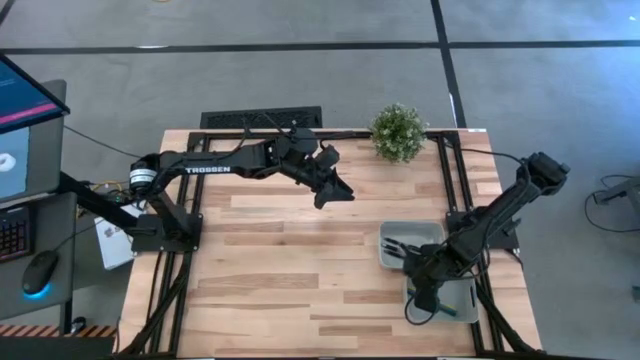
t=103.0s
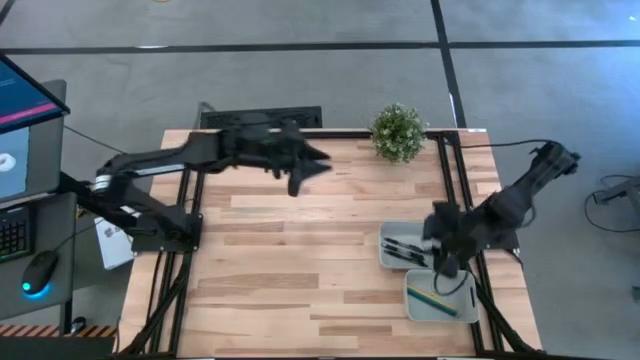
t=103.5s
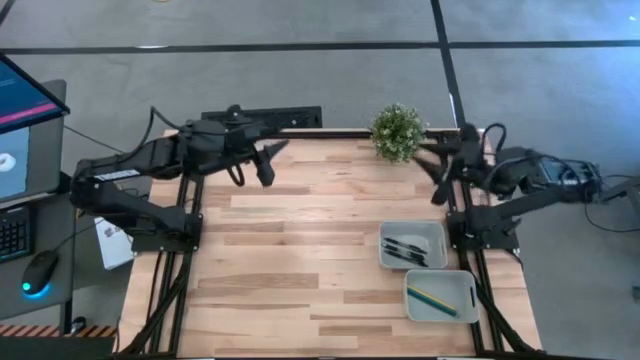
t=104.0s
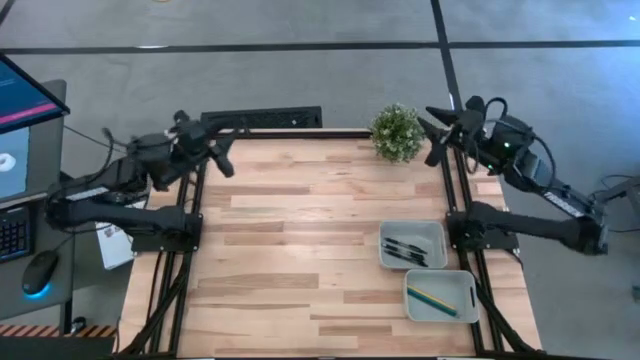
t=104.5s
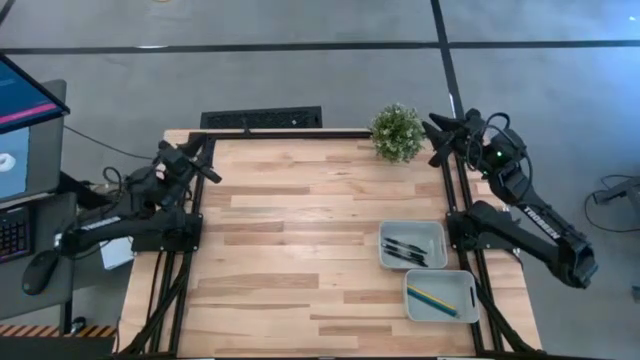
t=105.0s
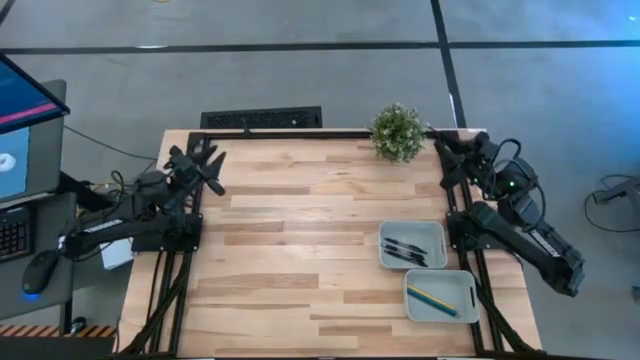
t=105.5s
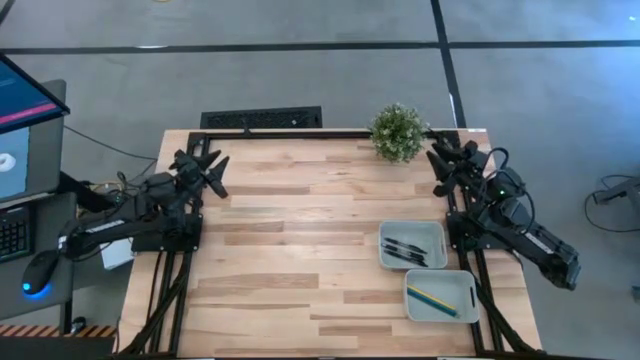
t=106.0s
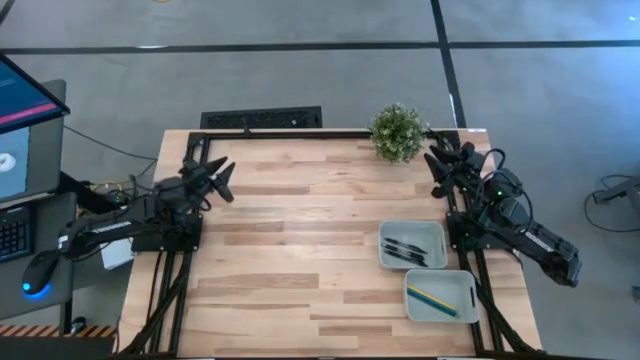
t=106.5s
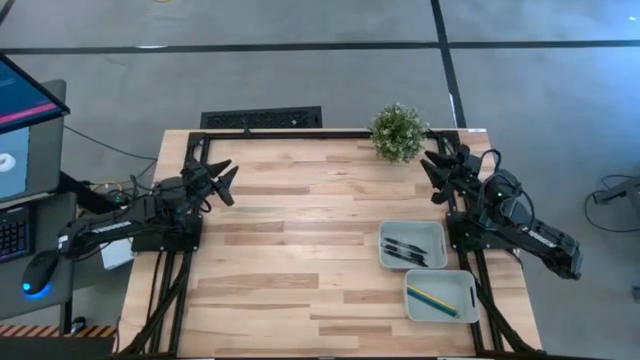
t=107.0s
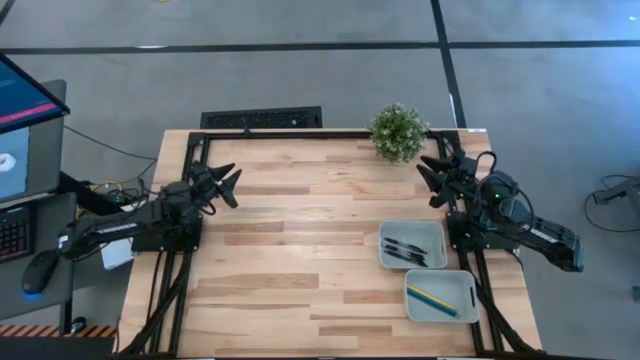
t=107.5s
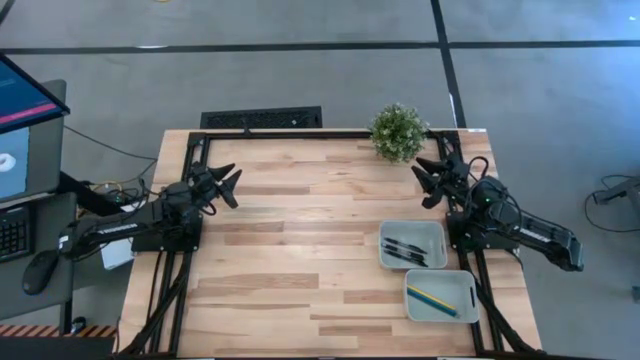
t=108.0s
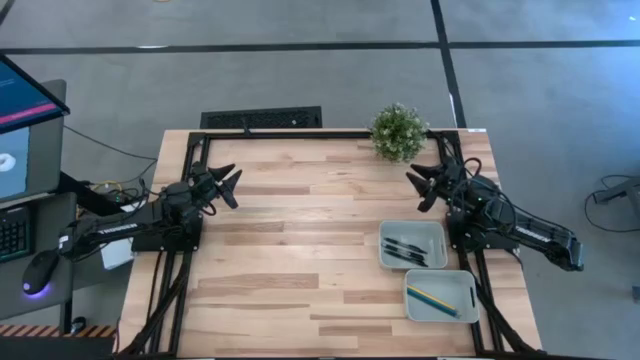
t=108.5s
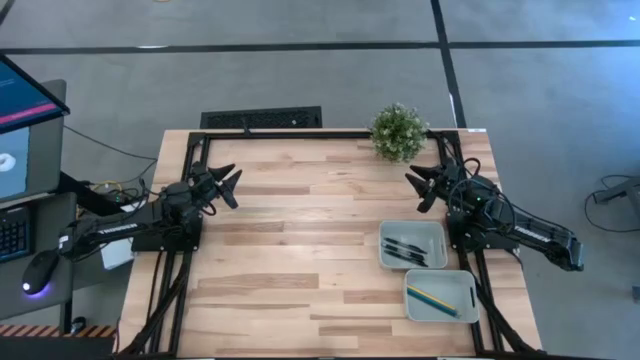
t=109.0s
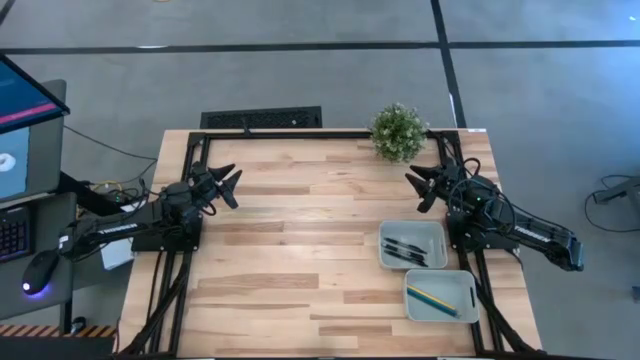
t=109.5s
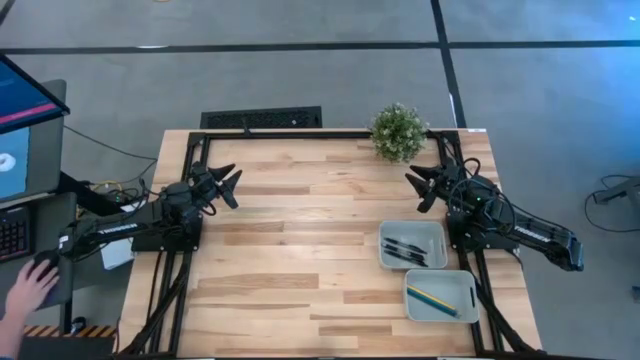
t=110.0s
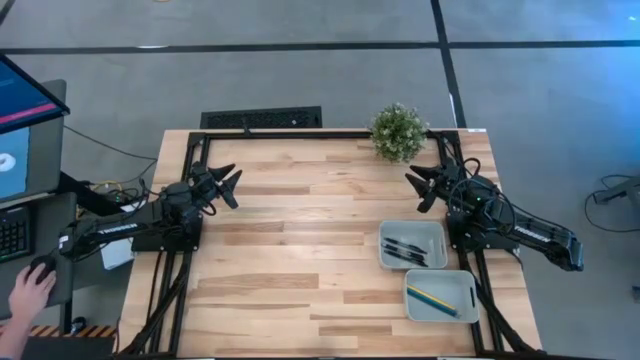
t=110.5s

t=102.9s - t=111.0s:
Task: Sort pens & pencils
Return to Home Position

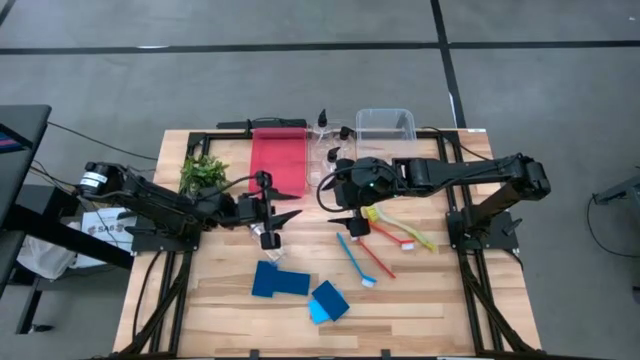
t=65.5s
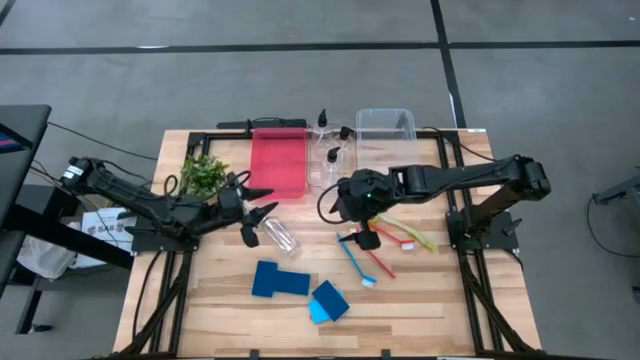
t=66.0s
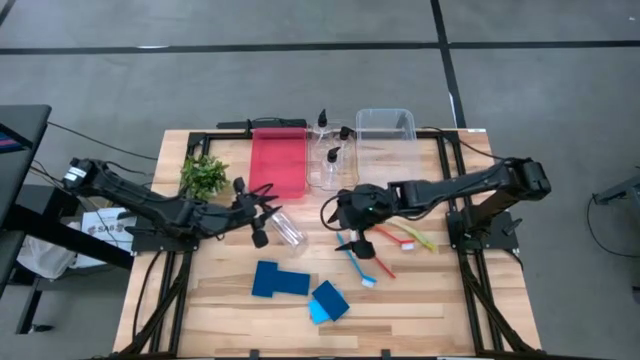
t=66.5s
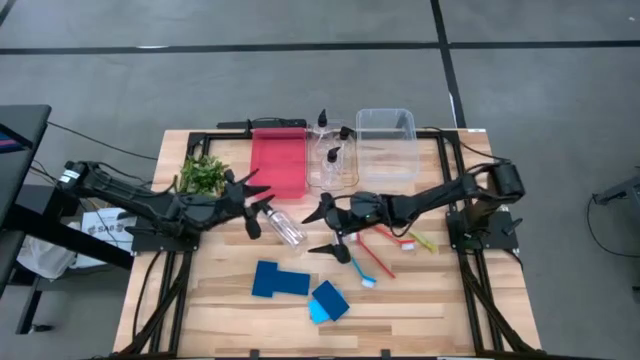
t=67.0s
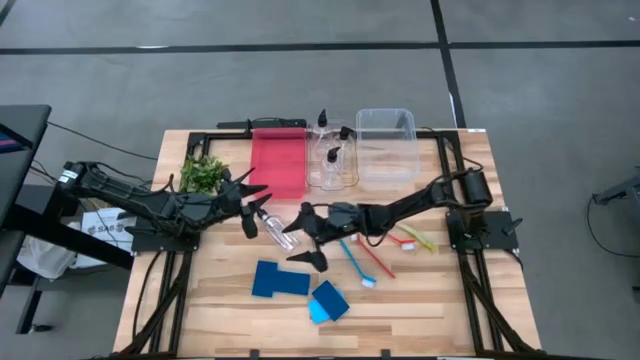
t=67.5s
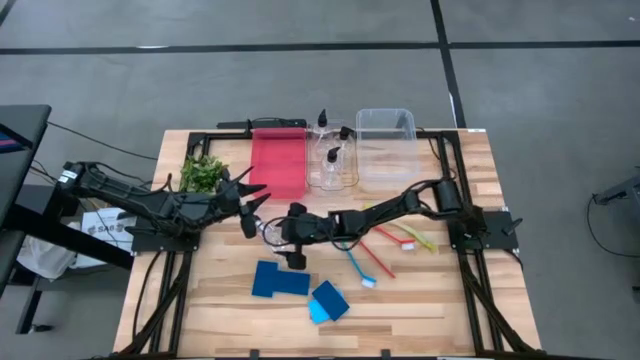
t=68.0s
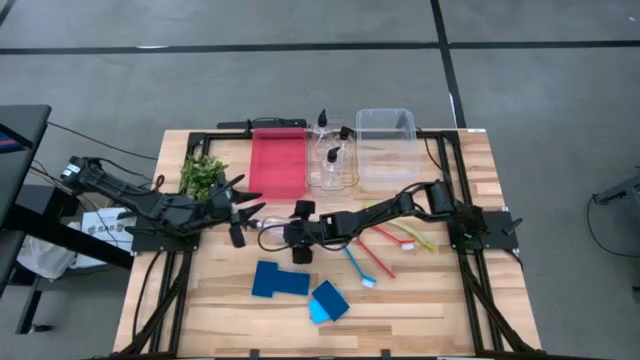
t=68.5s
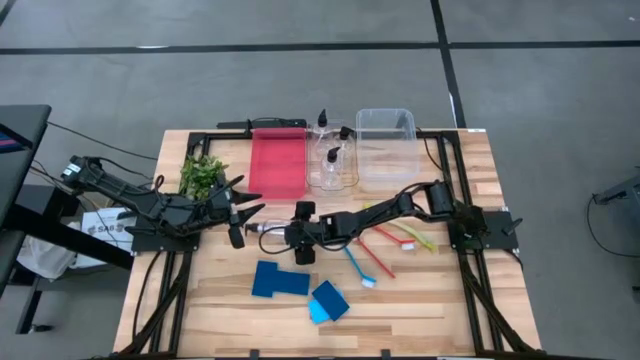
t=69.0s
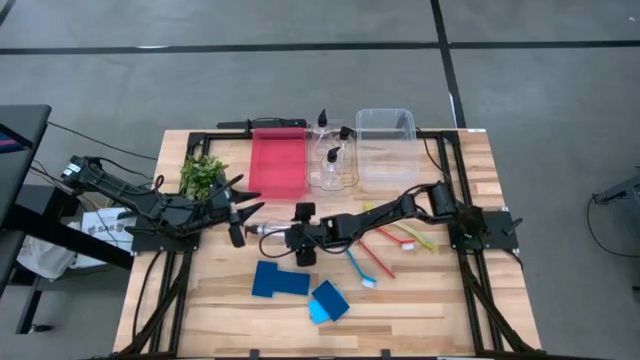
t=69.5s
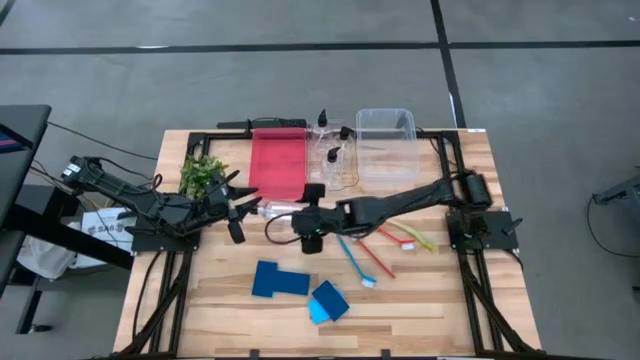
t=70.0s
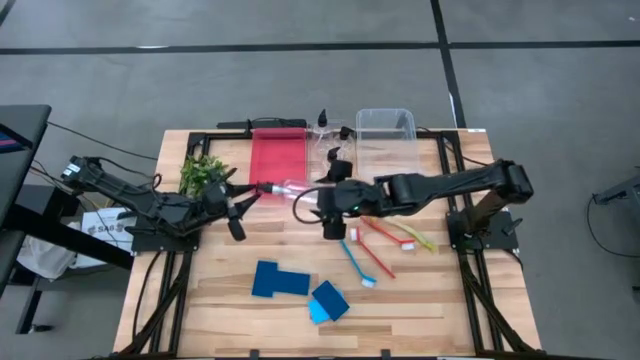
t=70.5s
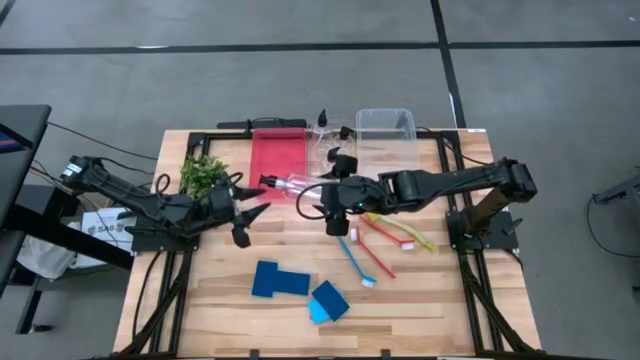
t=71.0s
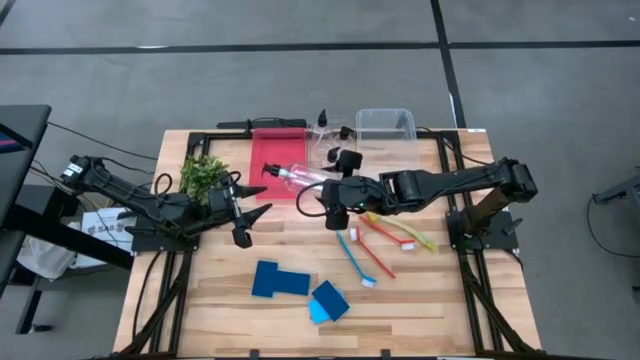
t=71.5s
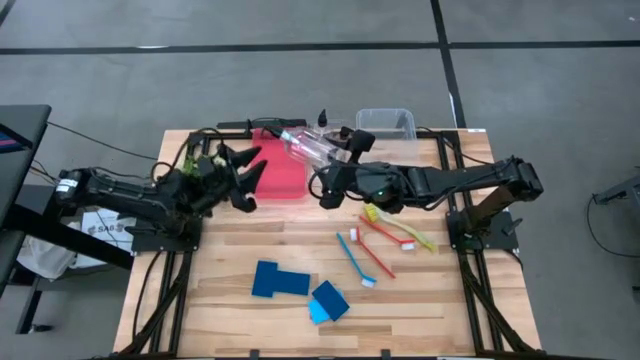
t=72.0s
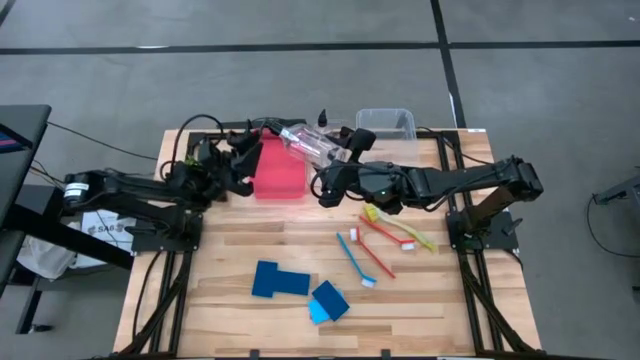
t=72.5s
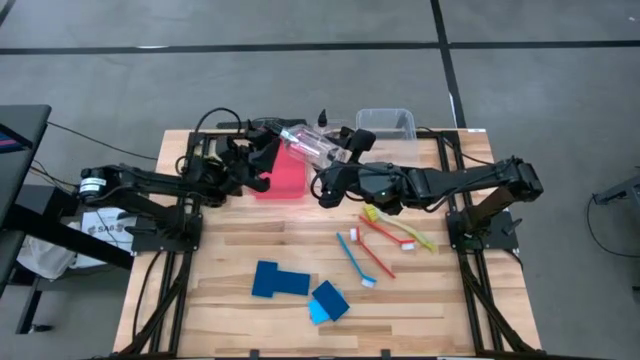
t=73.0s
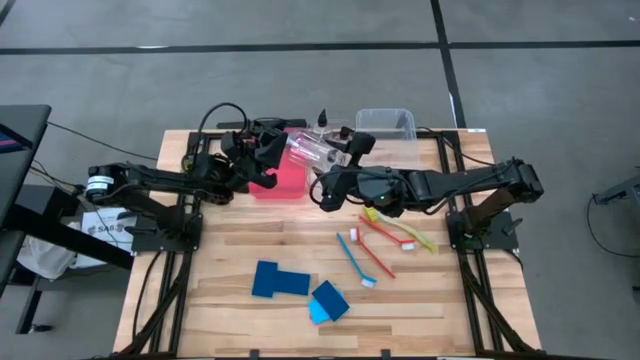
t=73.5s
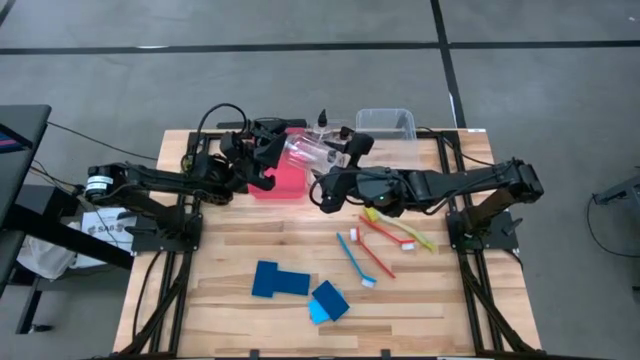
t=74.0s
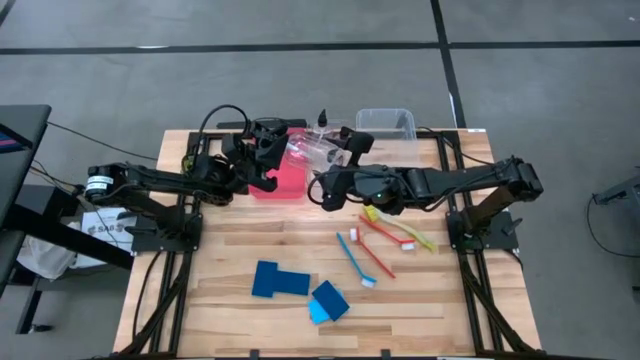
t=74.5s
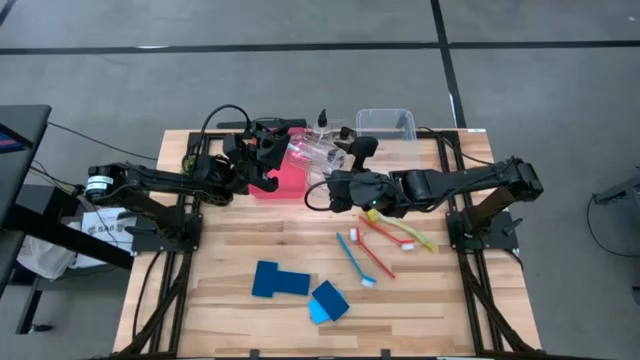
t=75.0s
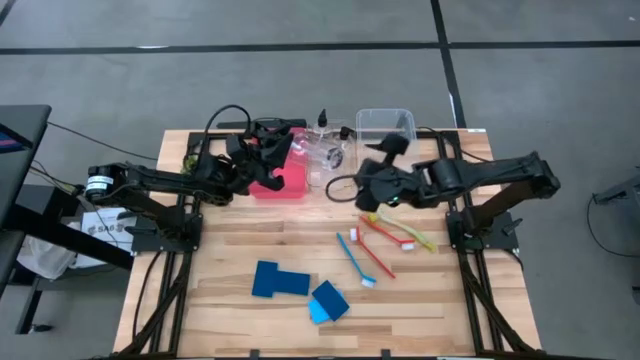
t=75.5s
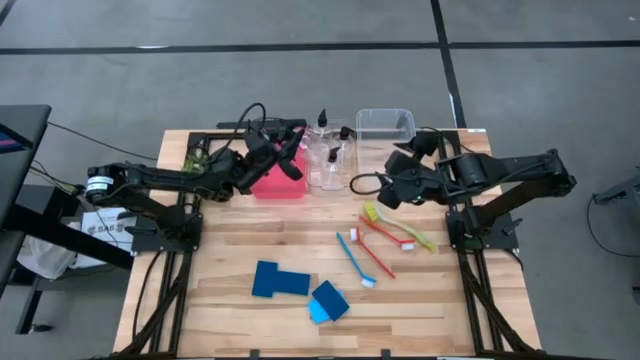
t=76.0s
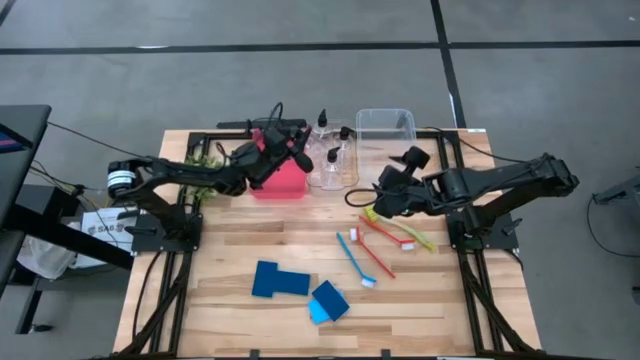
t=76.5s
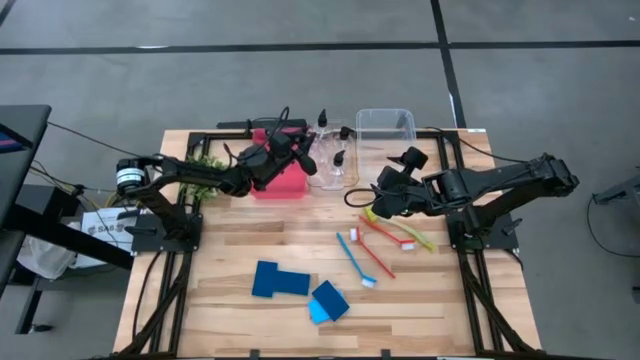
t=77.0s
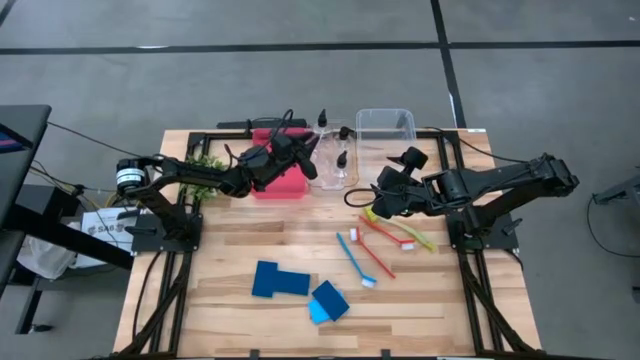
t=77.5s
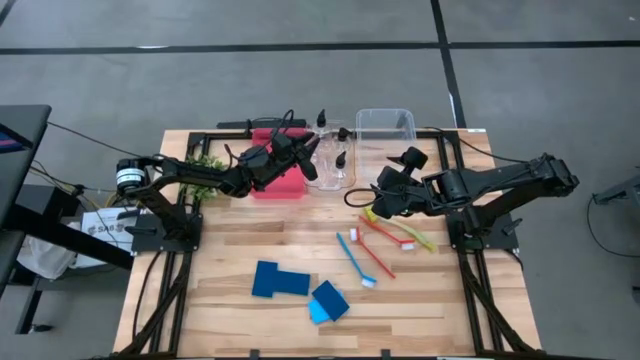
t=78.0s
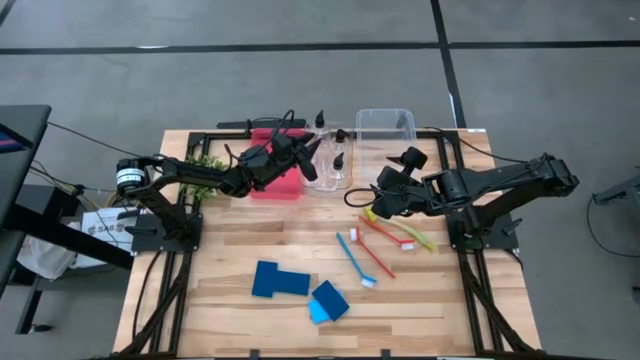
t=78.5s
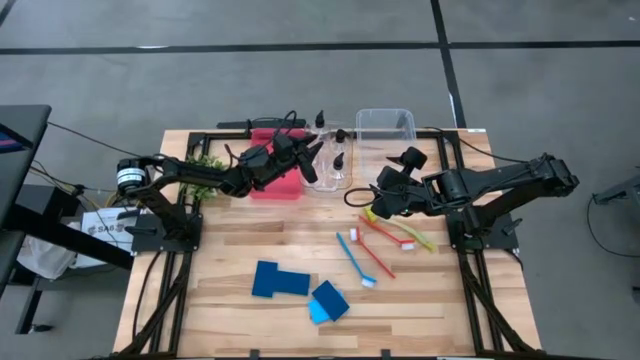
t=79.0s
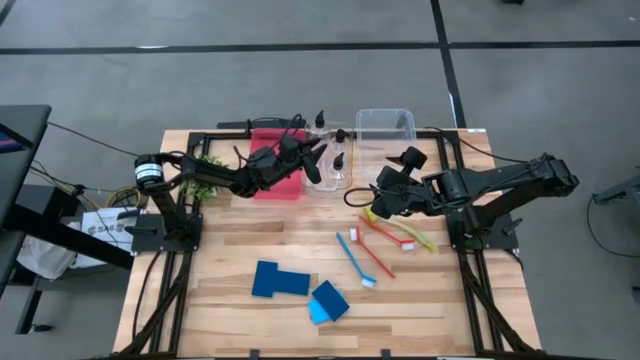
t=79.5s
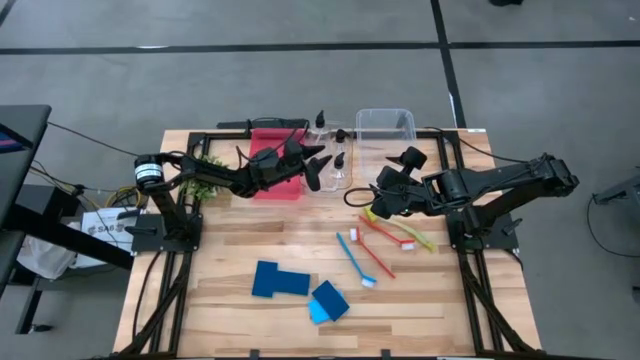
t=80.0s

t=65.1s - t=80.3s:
Task: Pick & Place Kitchen Sink Supplies
Put the soap dispenser into the left transparent bin
